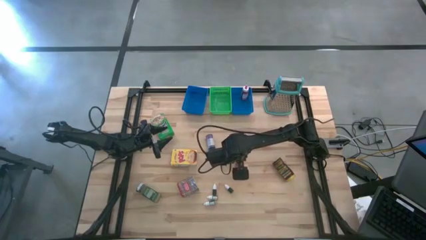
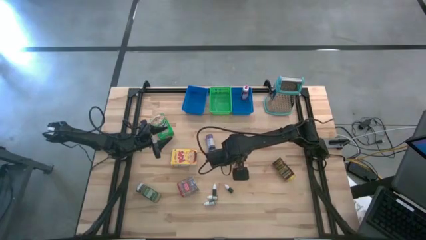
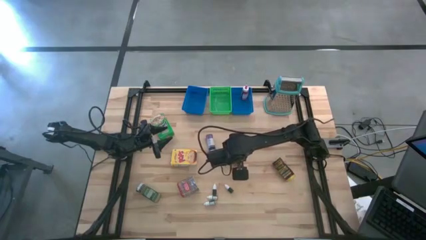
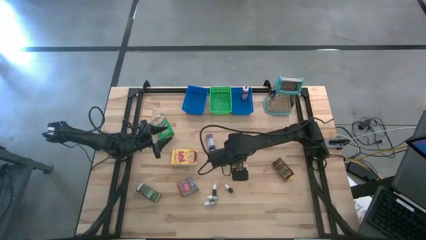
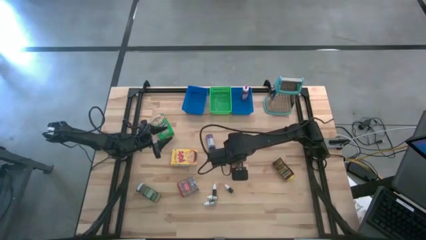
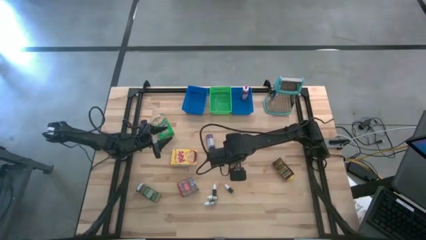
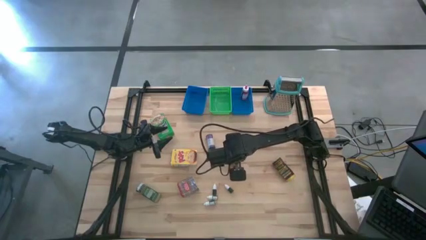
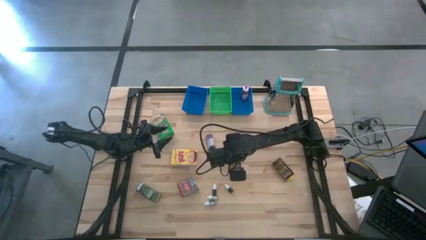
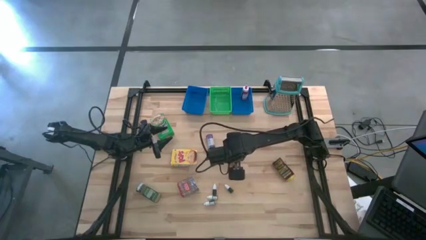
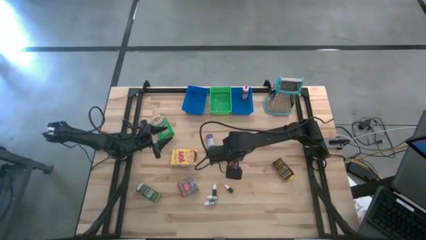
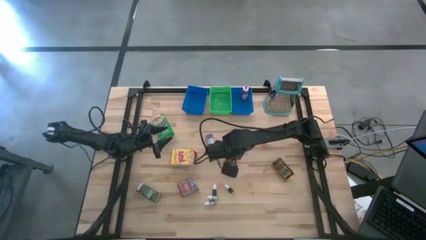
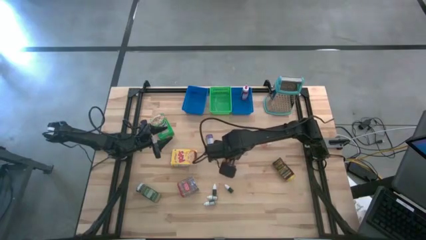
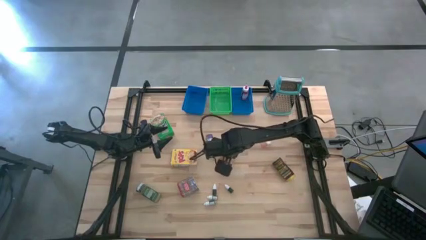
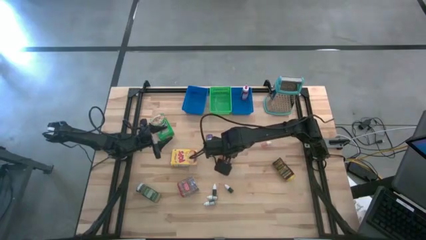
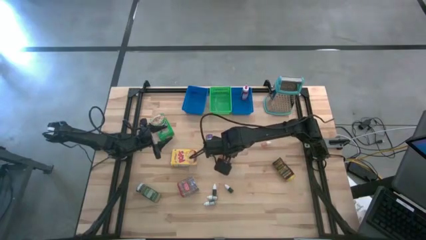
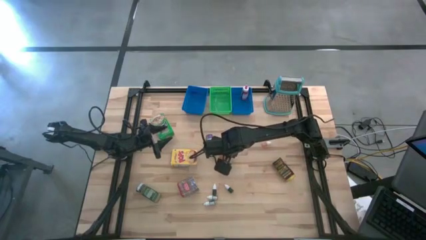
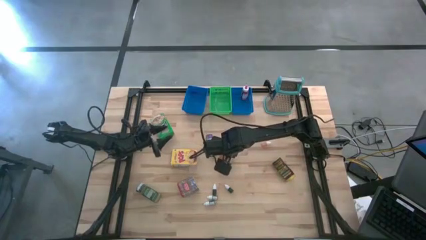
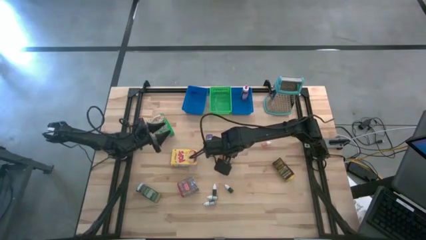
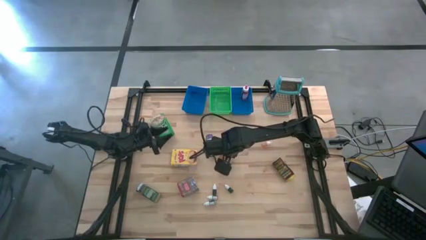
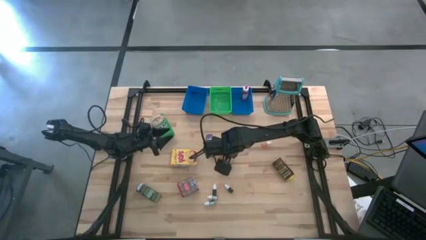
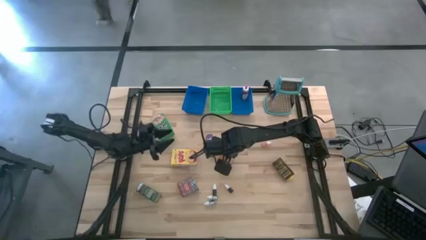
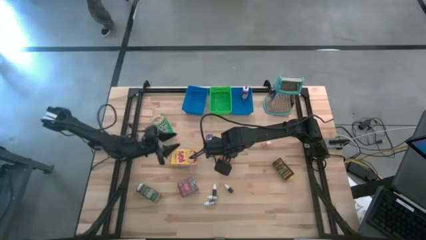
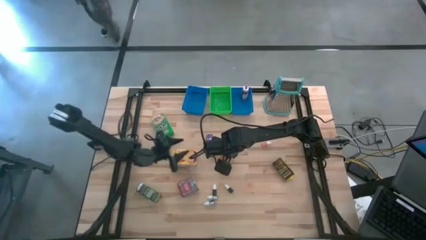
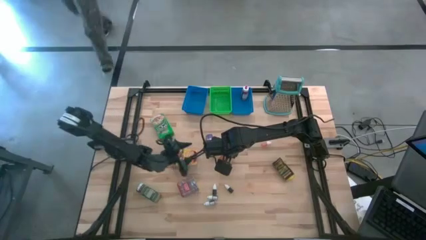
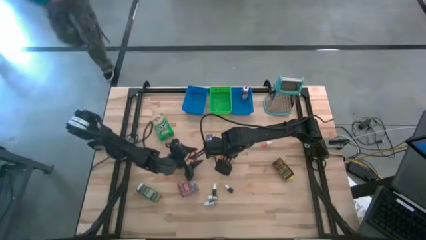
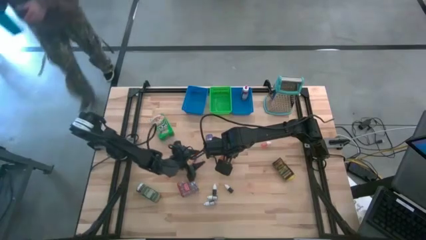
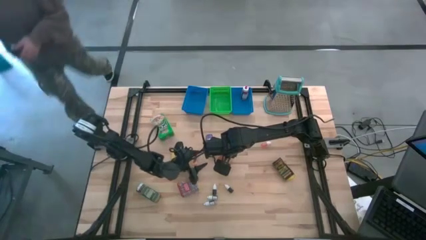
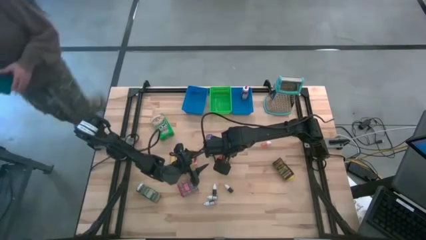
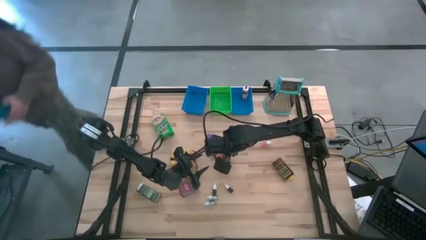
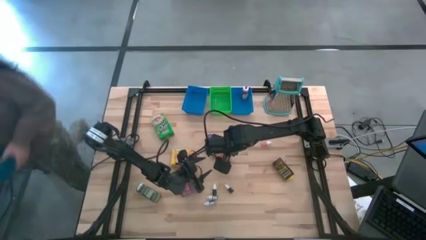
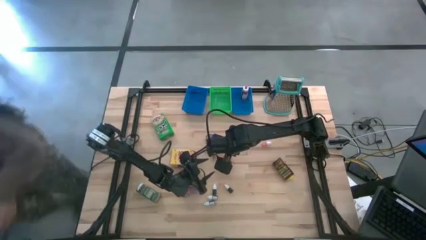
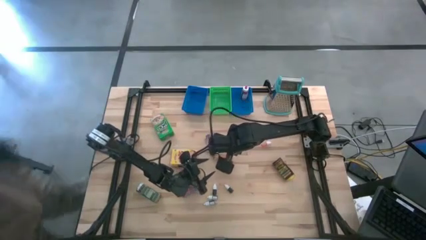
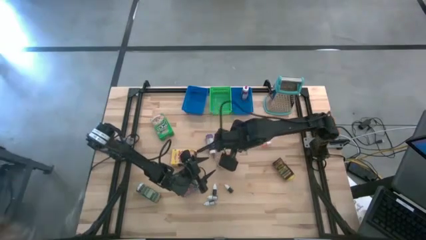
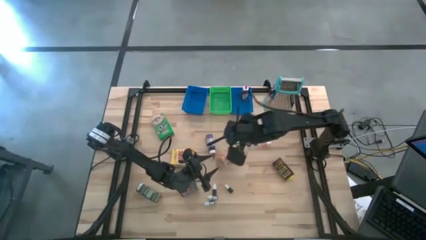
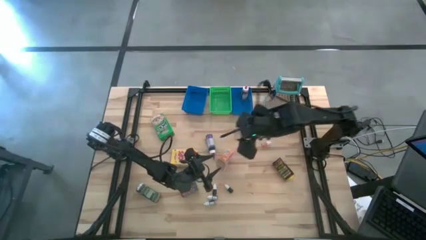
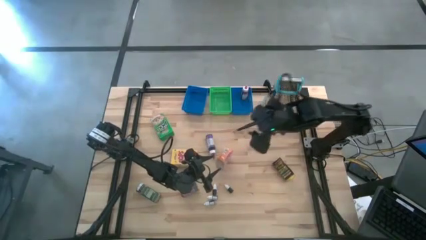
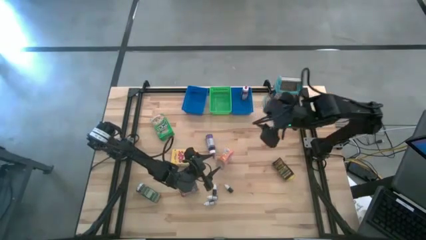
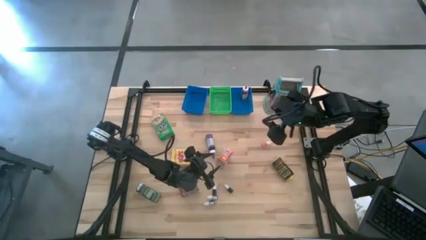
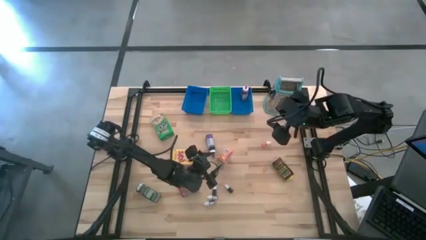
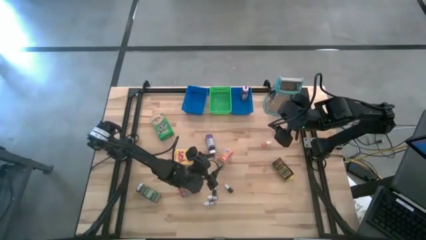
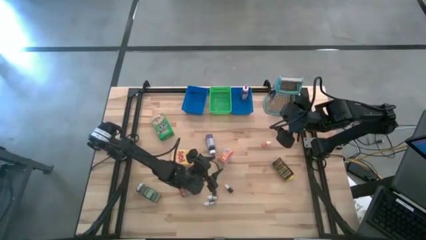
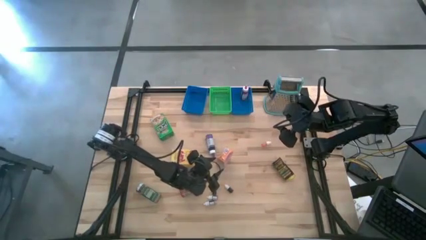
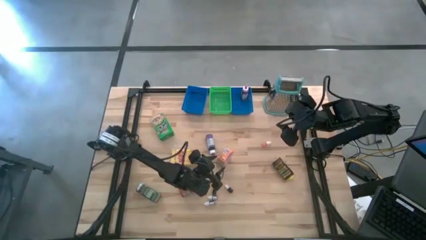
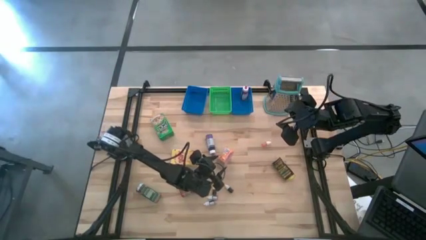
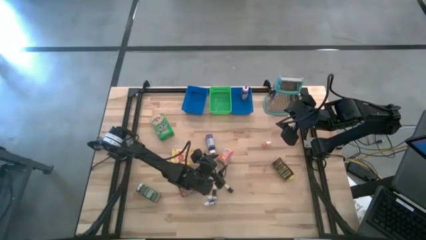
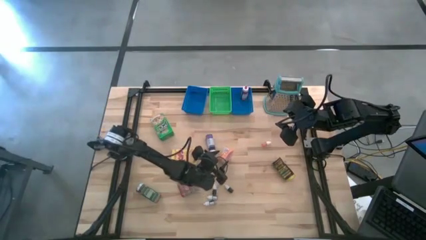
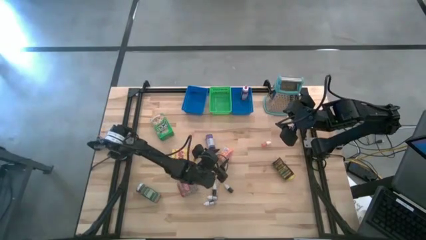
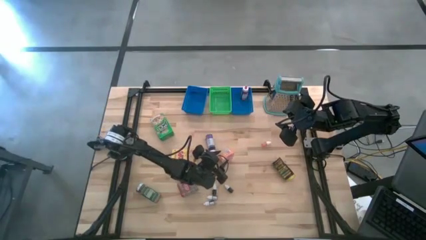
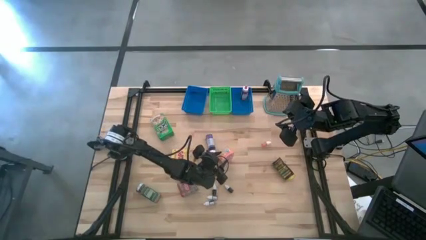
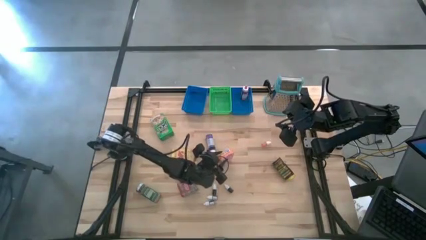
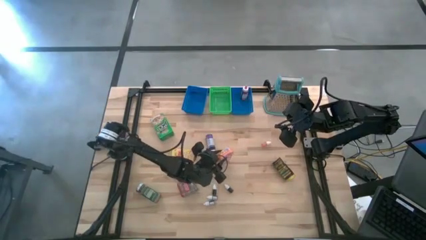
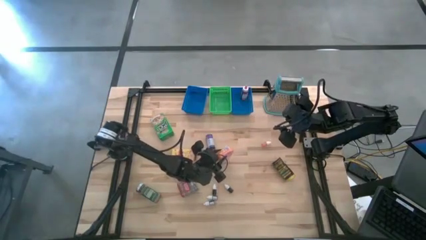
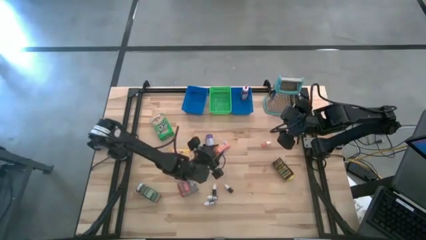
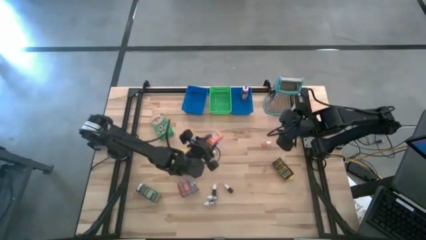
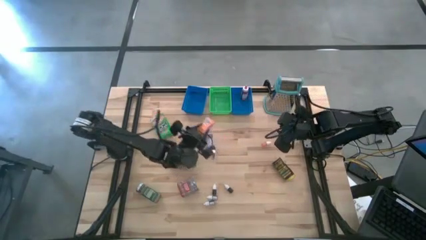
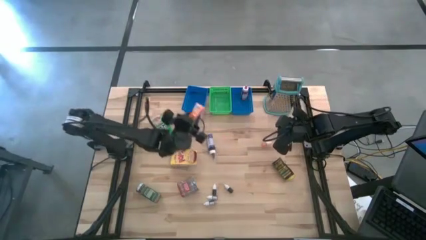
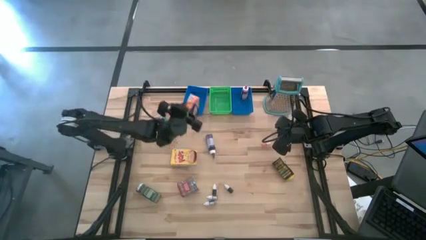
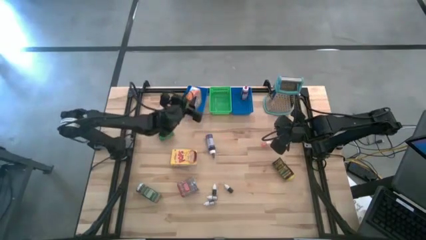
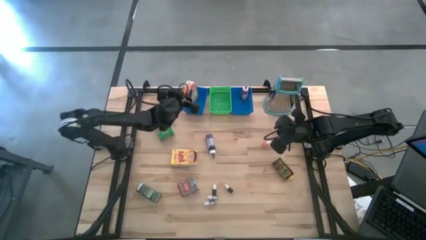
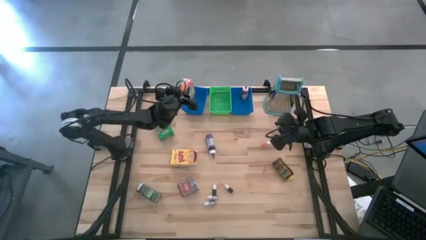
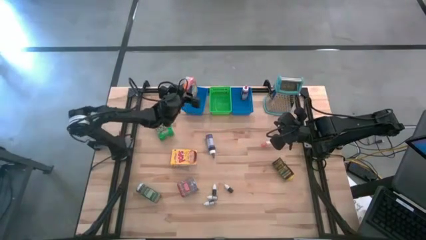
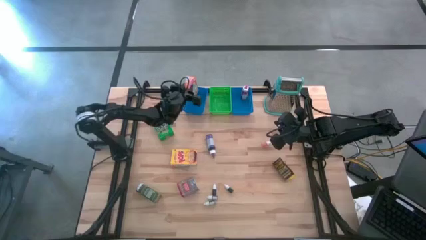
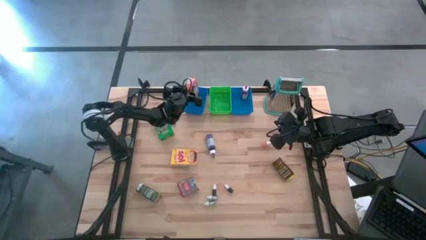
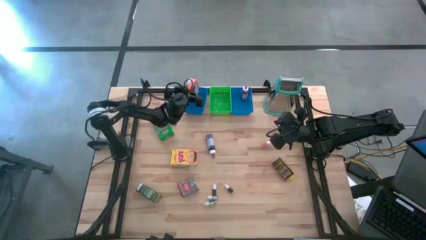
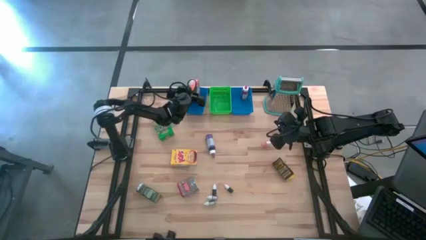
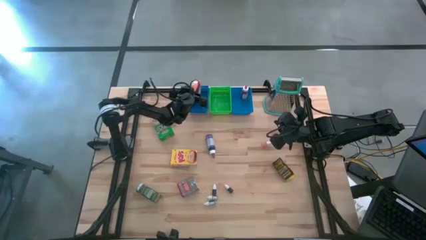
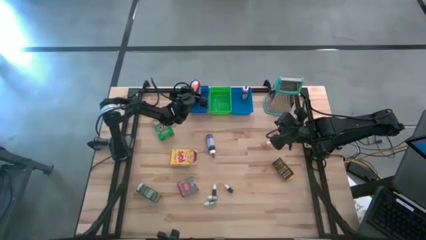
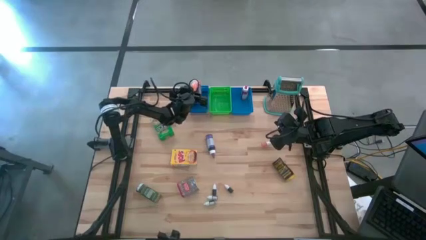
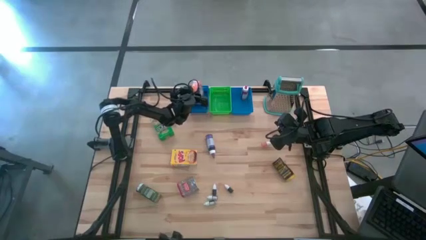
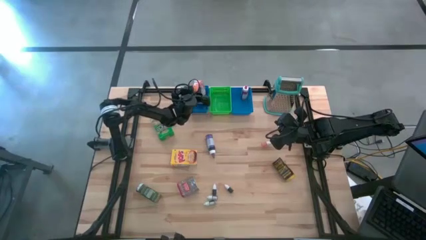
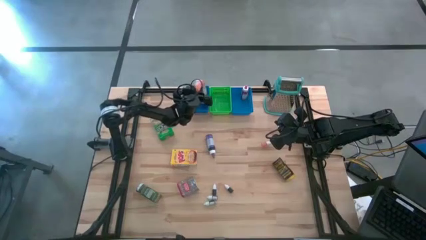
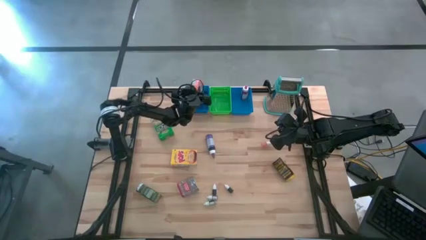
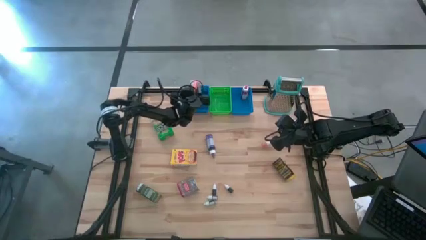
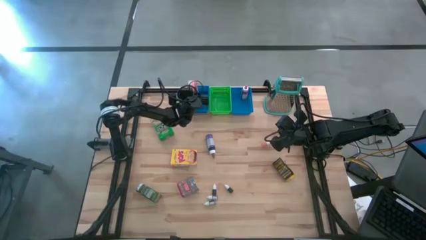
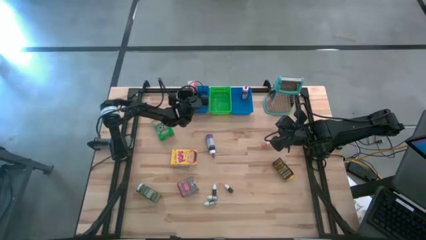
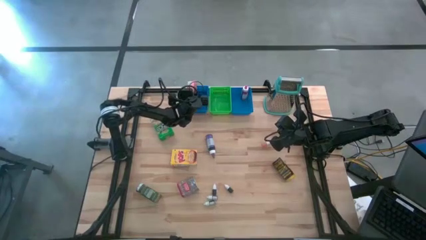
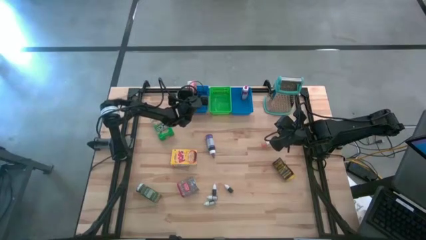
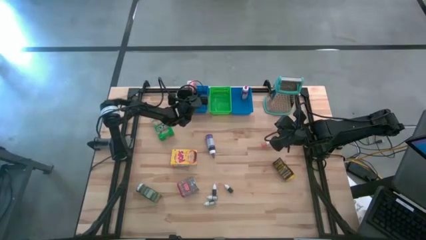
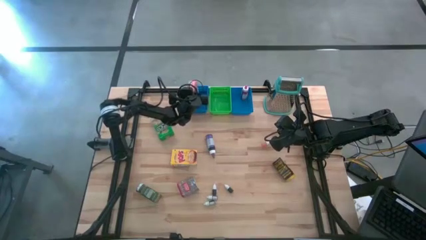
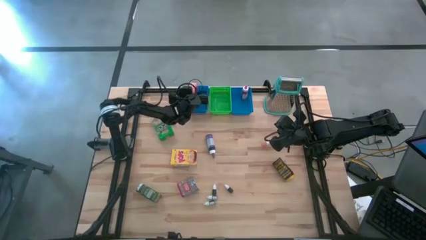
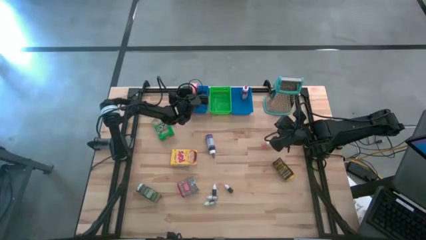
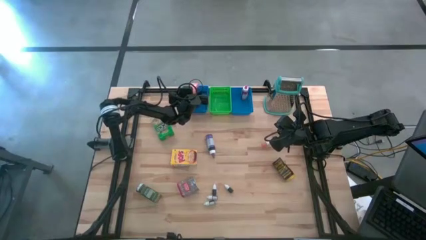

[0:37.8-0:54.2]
Task: Pick & Place Kitchen Items
Put the orange cereal box into the left blue bin

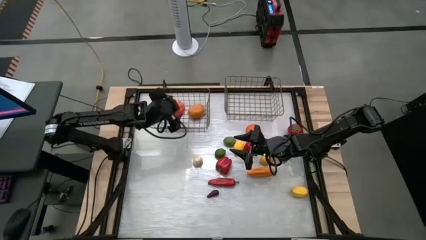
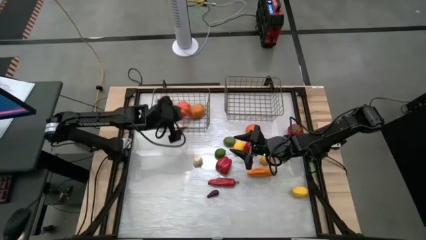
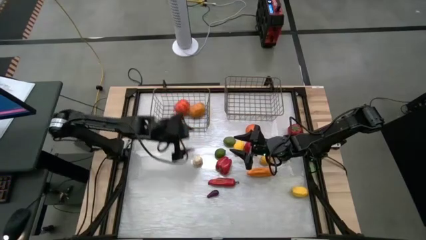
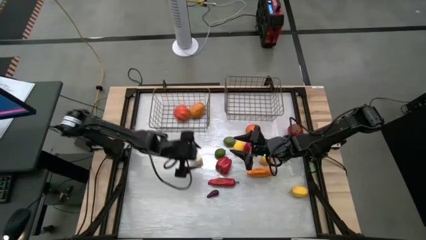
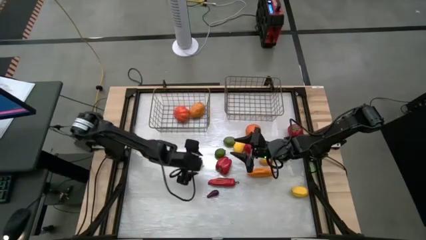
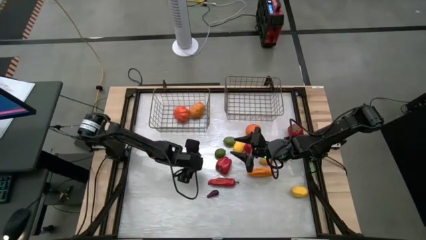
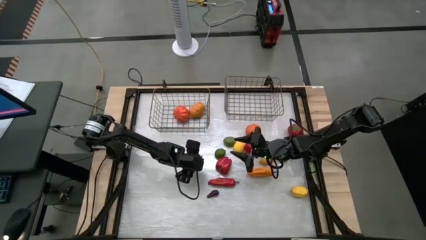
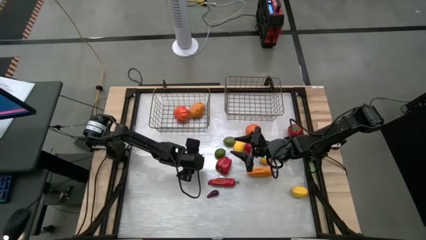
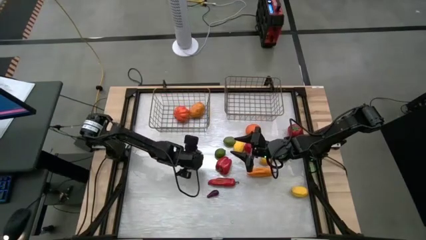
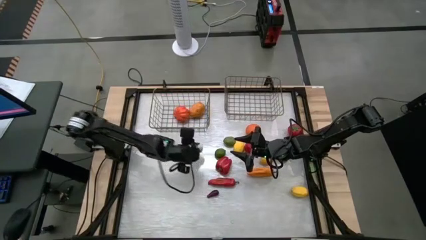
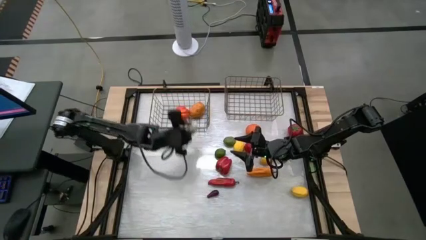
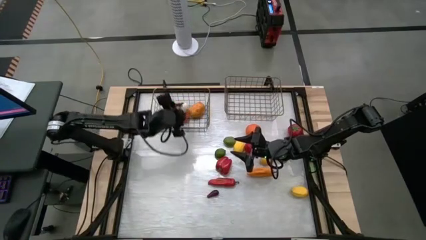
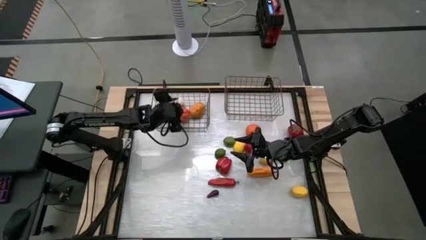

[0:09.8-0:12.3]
Task: Sort produce into baskets
Put the garlic into the left gold wire basket
